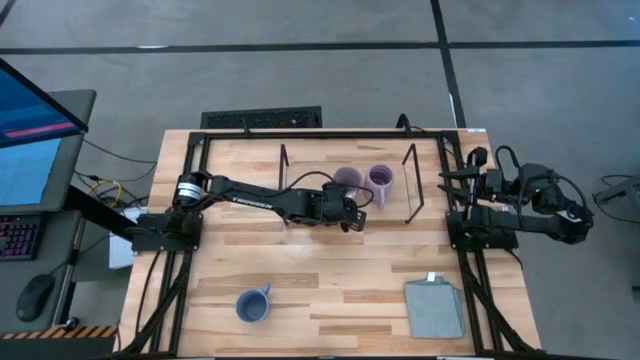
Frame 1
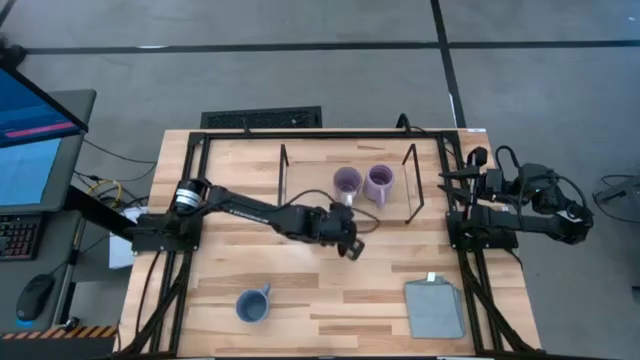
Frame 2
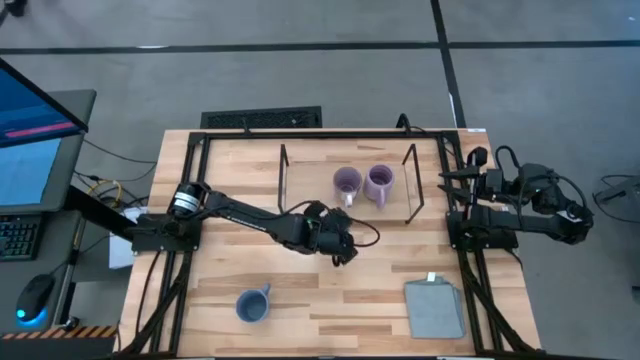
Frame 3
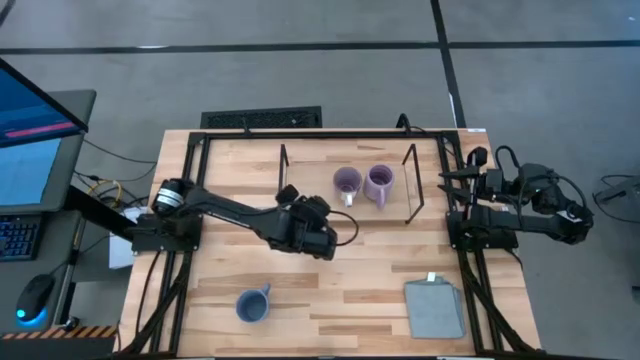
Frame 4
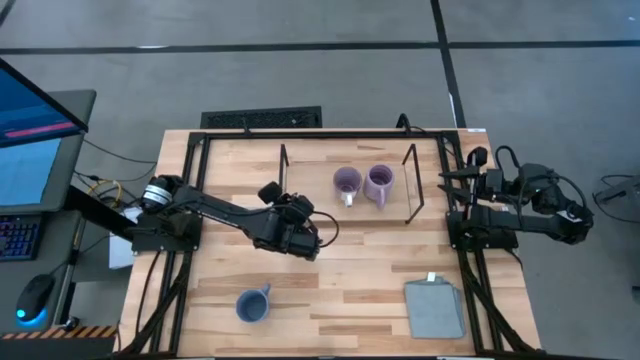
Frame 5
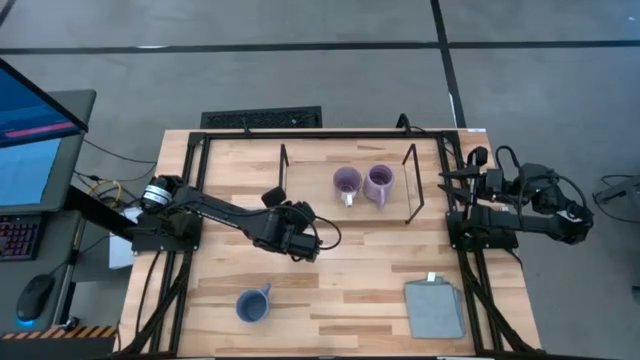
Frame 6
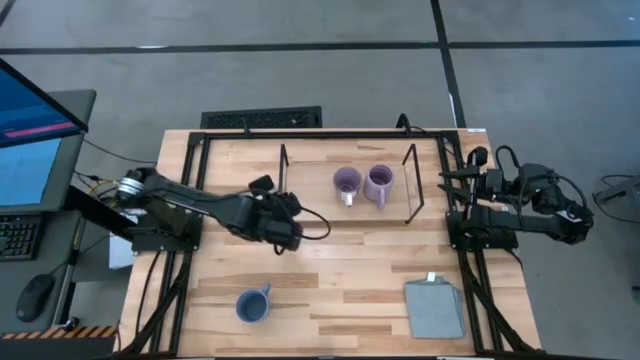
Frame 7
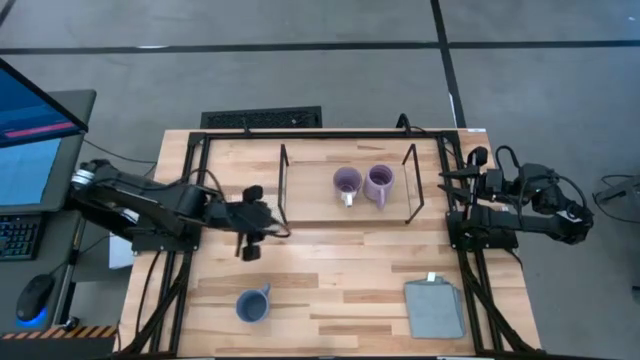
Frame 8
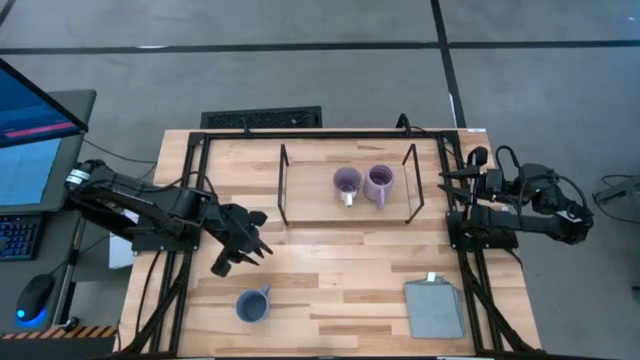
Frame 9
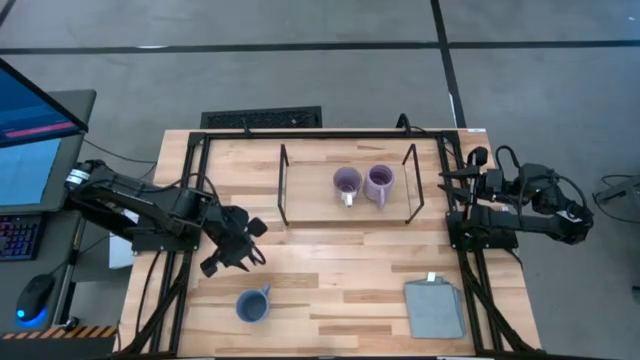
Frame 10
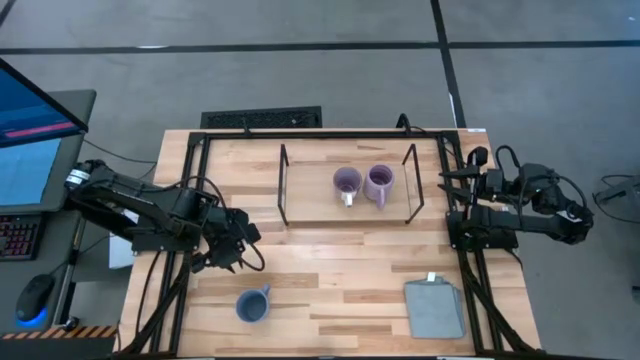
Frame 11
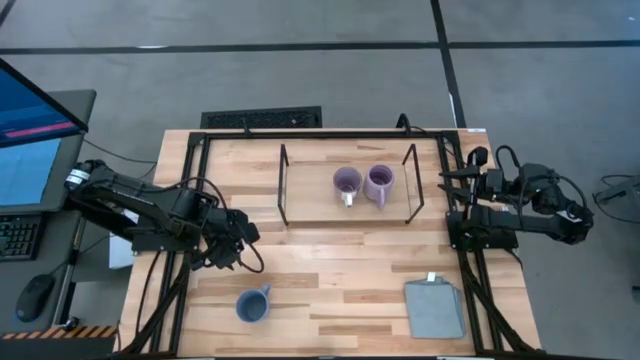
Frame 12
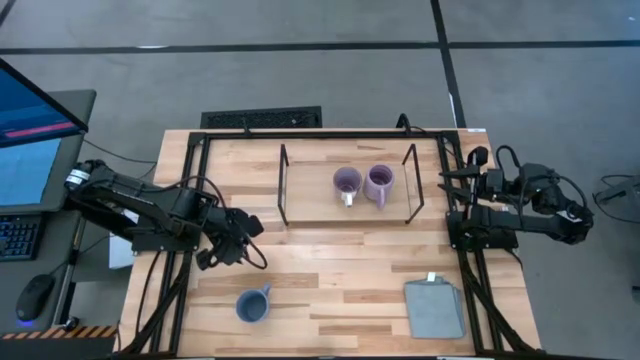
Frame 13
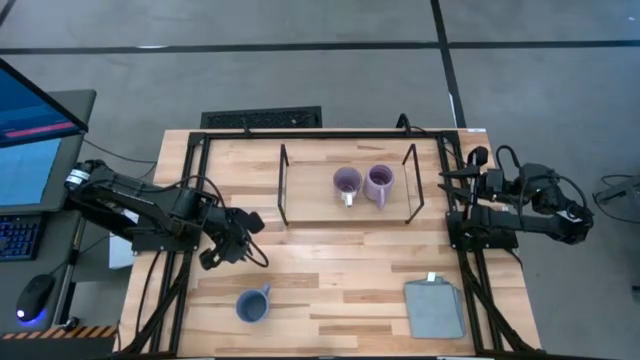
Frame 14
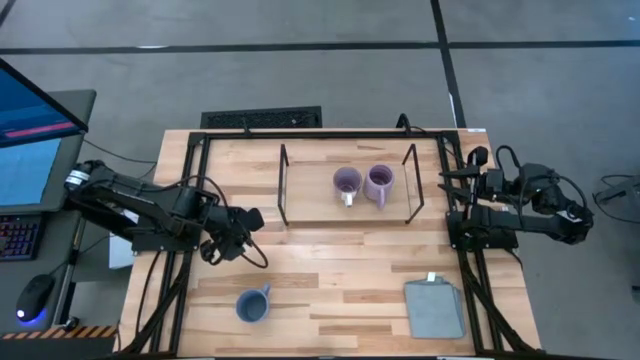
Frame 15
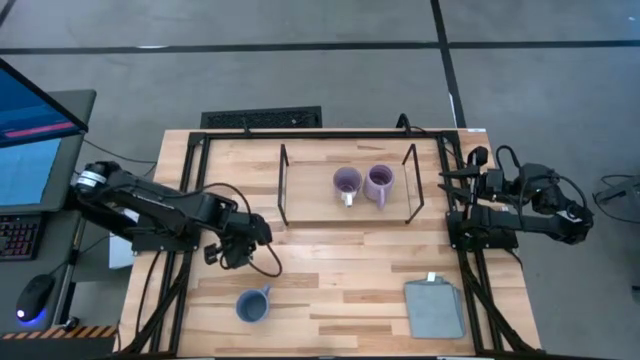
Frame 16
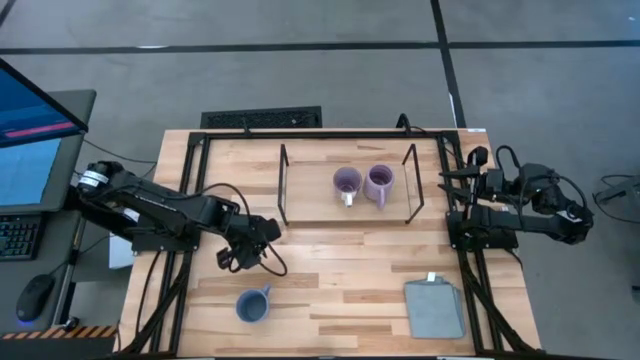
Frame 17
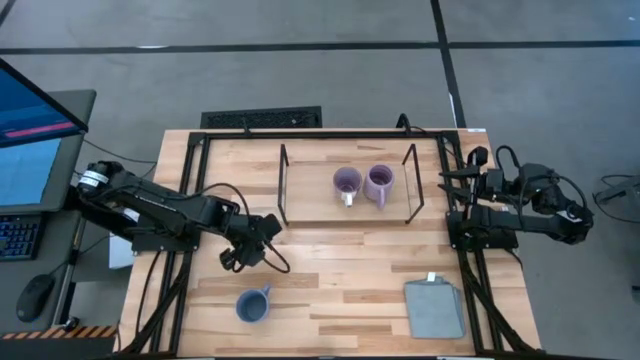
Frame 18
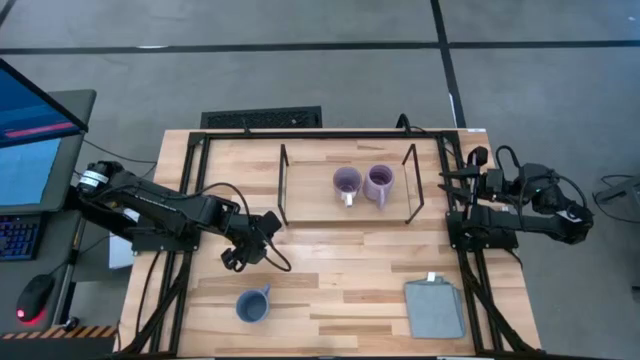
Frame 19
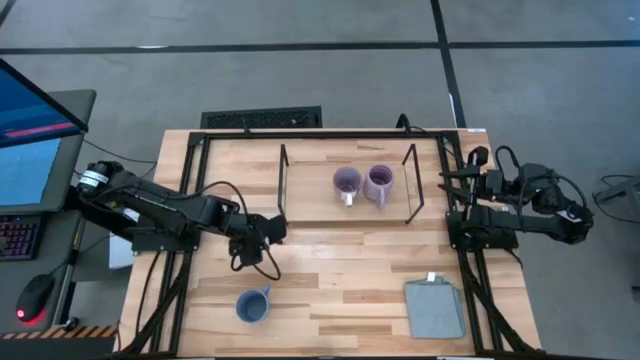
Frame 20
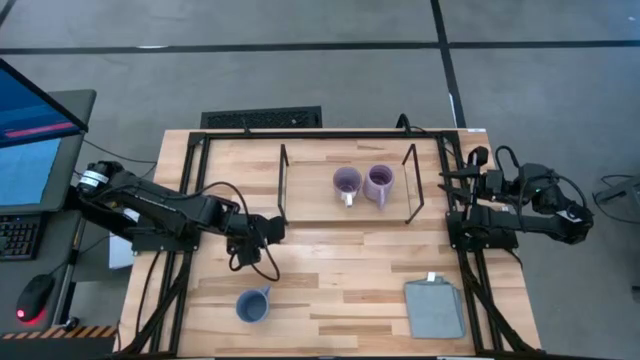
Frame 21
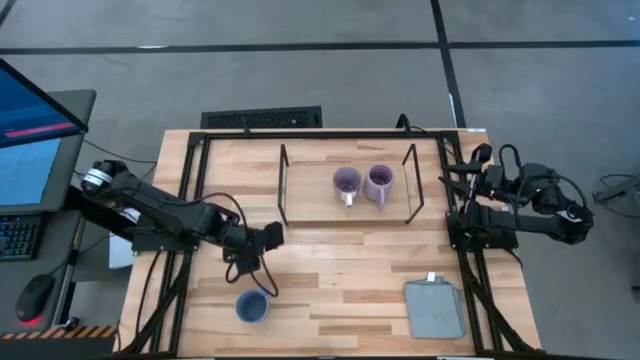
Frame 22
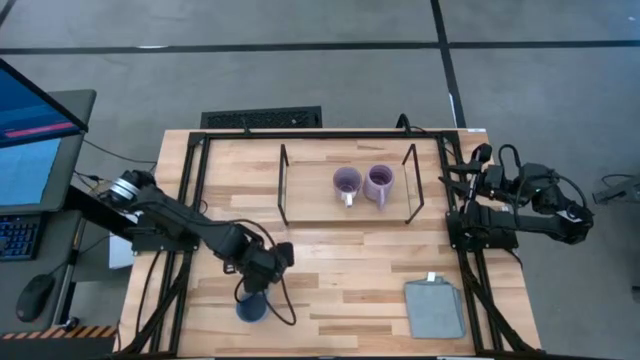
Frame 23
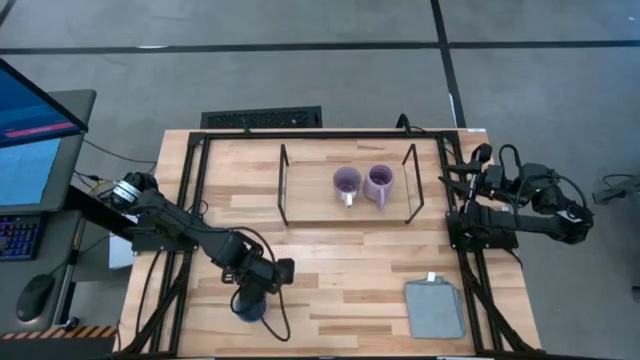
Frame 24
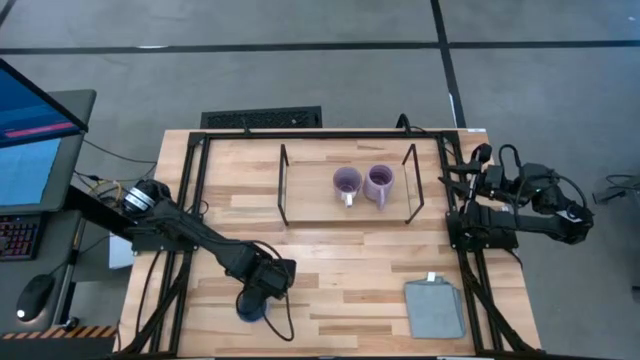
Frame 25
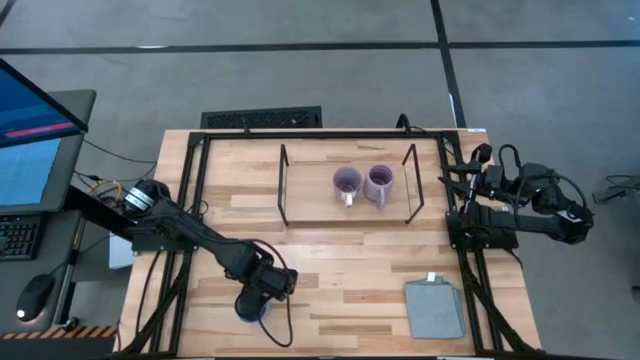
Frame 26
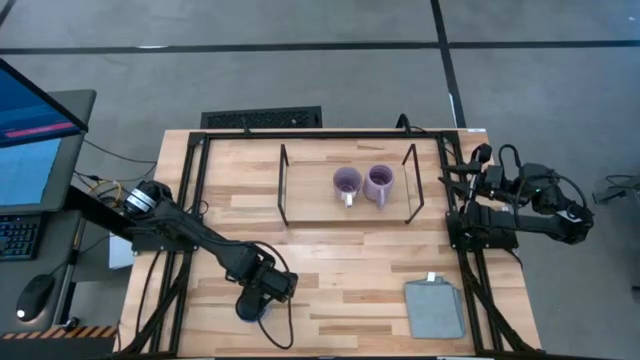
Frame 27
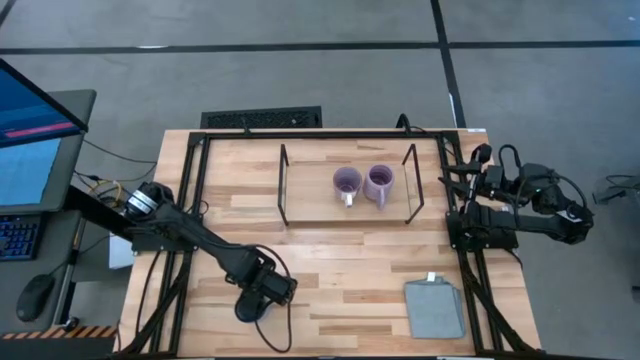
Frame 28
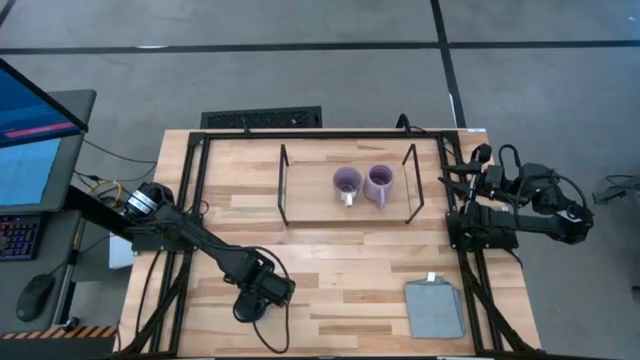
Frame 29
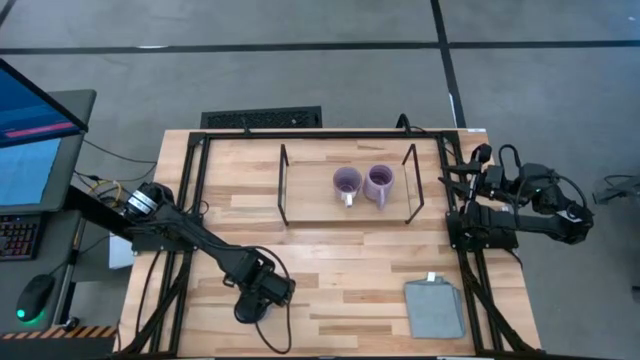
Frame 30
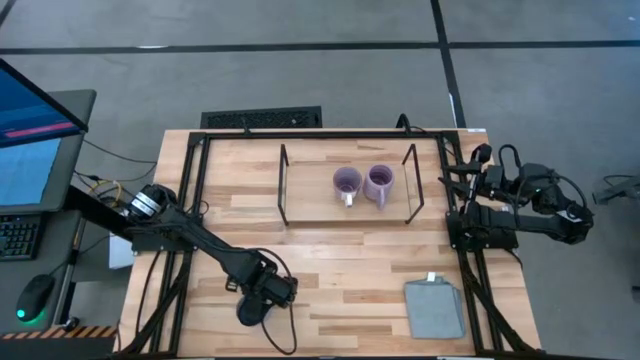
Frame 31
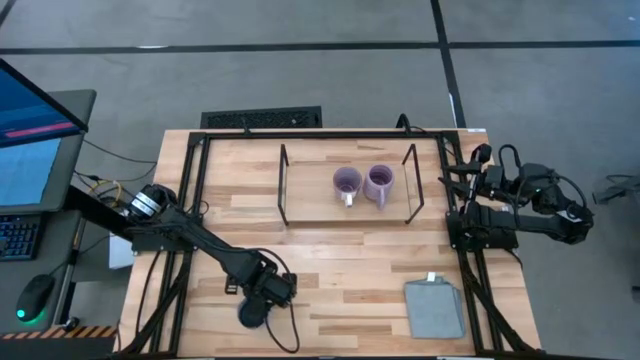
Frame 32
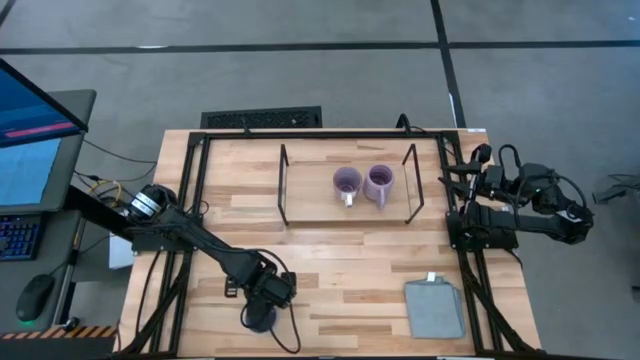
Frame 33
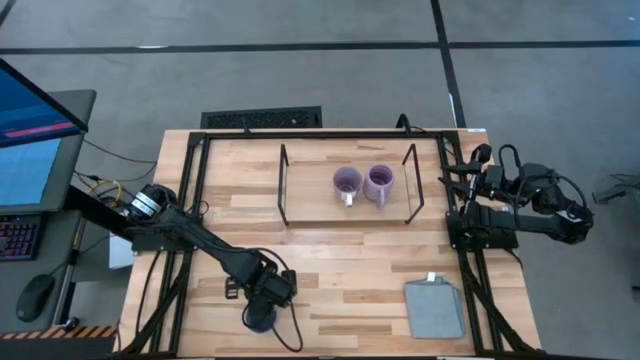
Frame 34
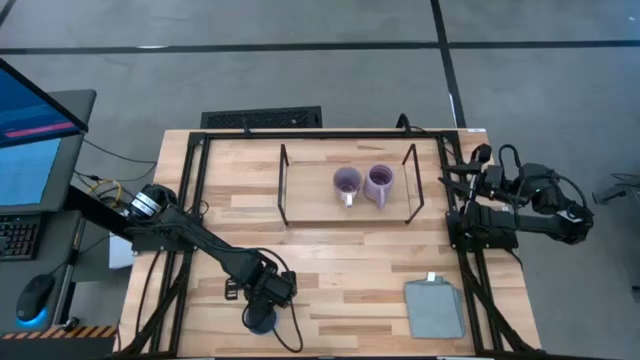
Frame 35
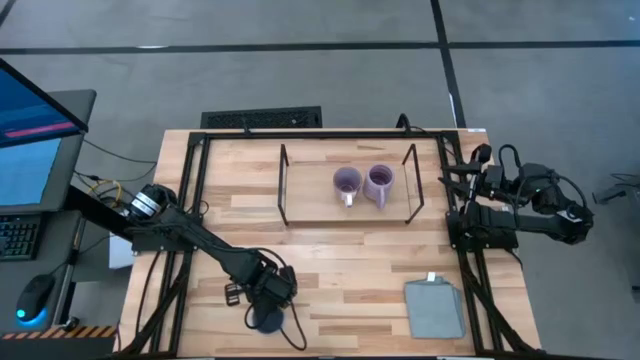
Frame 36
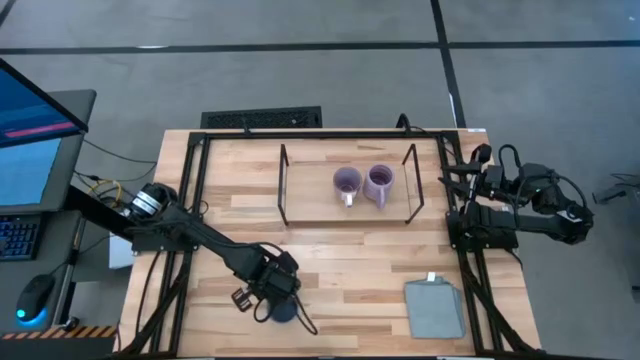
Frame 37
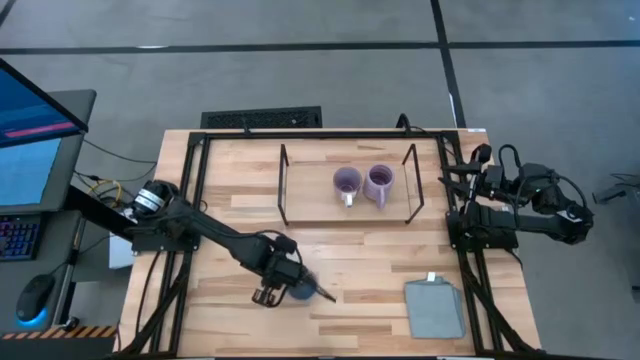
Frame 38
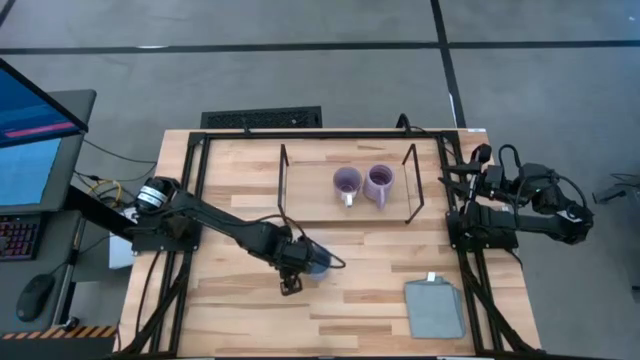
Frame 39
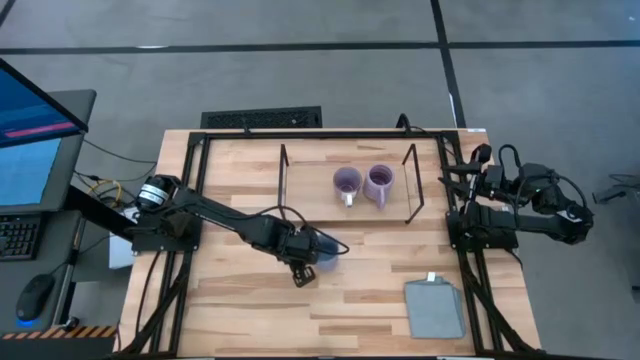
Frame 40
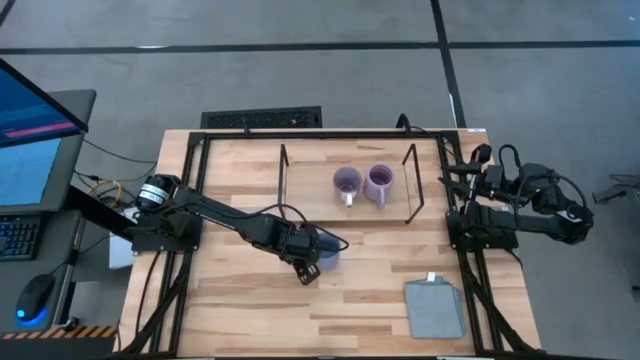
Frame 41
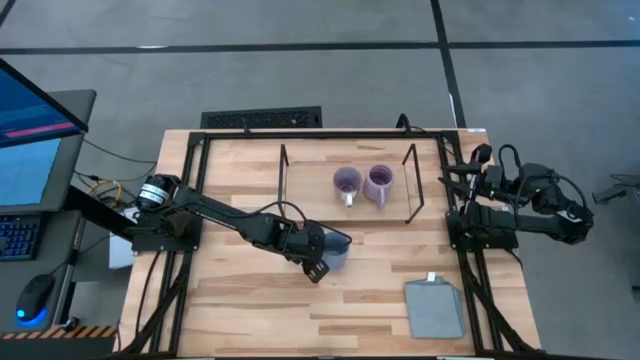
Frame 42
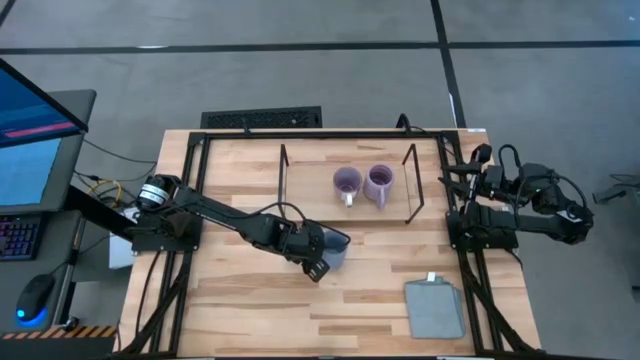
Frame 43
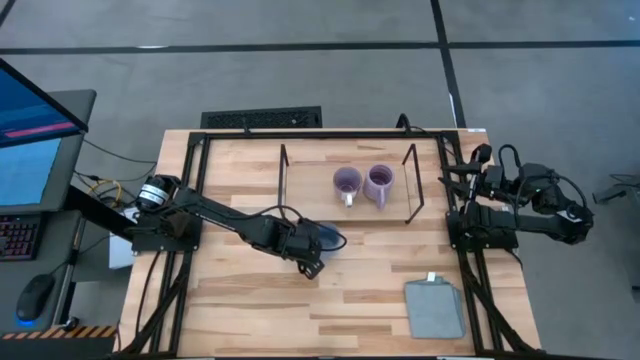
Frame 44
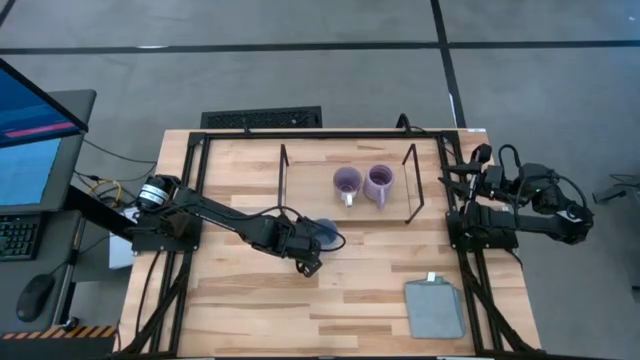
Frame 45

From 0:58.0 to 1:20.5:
Task: Stack small to large cups/mugs on shelf
Put the blue mug on the shelf

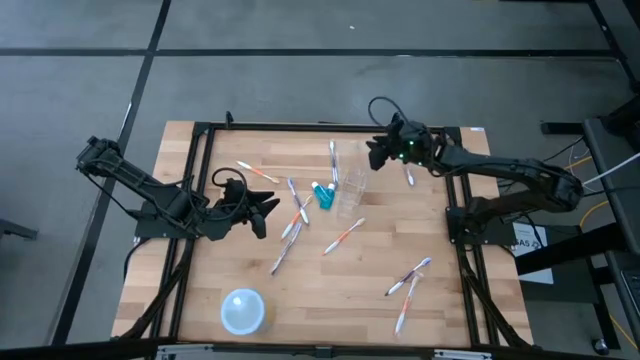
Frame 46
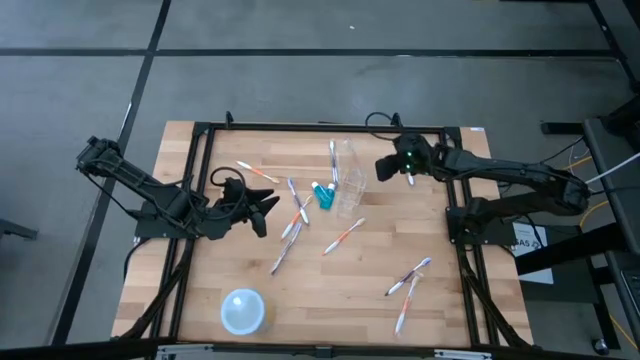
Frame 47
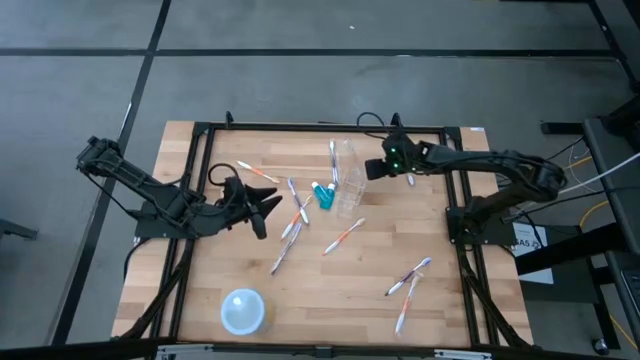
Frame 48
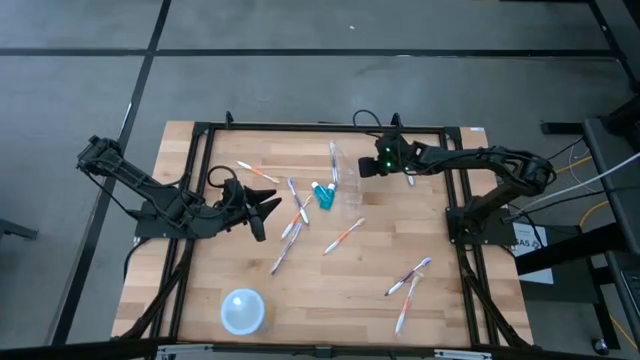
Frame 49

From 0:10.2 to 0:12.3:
Task: Pick & Place toothbrushing station
Adjust the transparent organizer on the table
